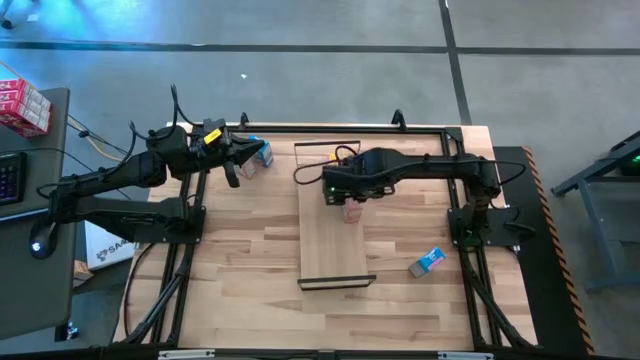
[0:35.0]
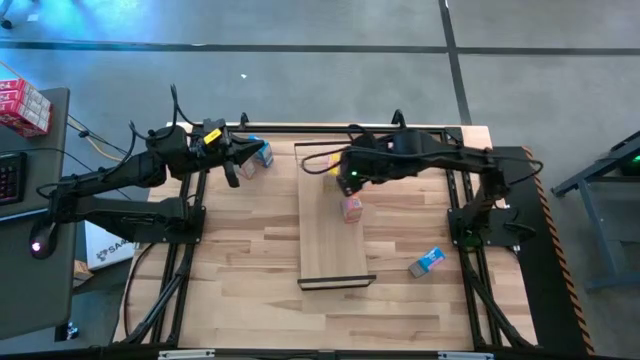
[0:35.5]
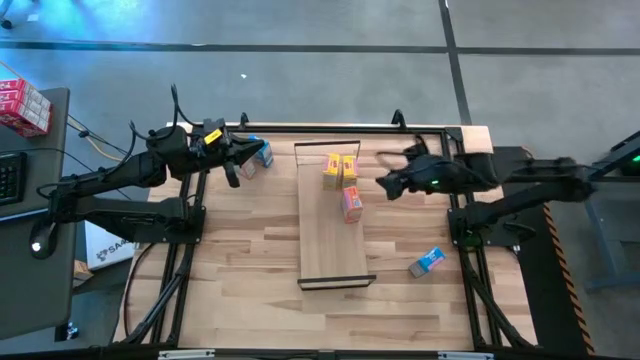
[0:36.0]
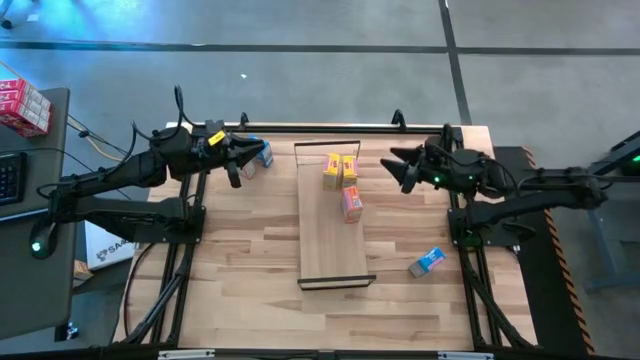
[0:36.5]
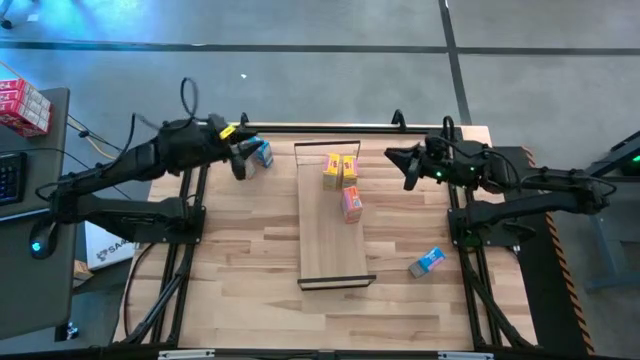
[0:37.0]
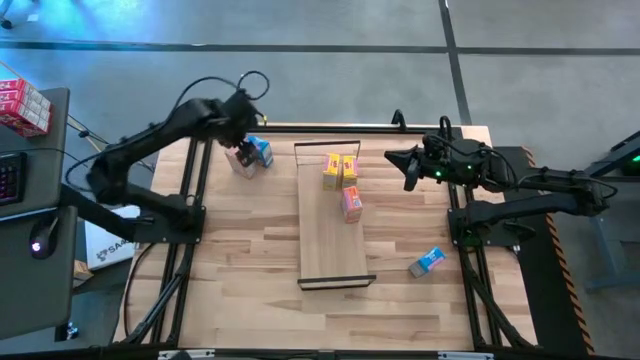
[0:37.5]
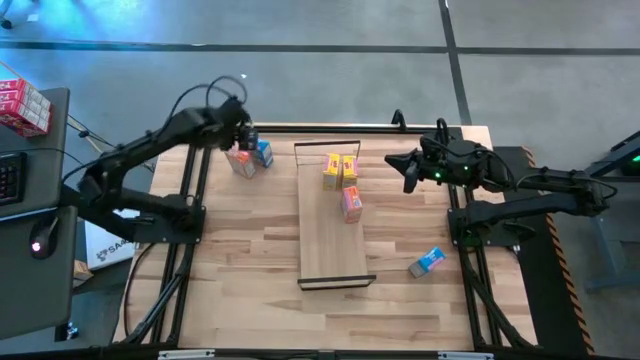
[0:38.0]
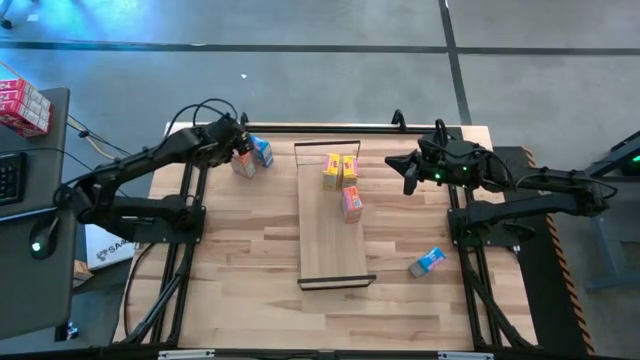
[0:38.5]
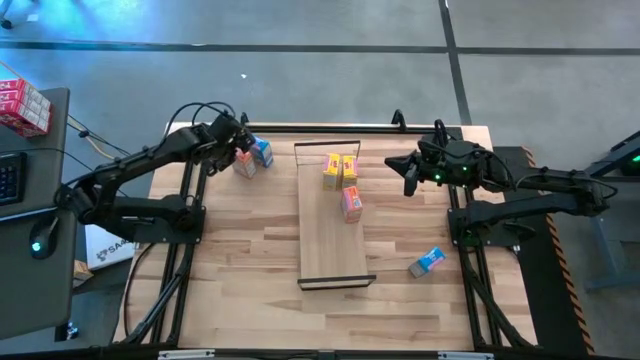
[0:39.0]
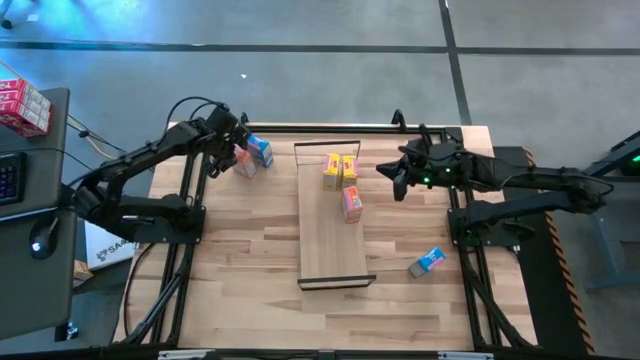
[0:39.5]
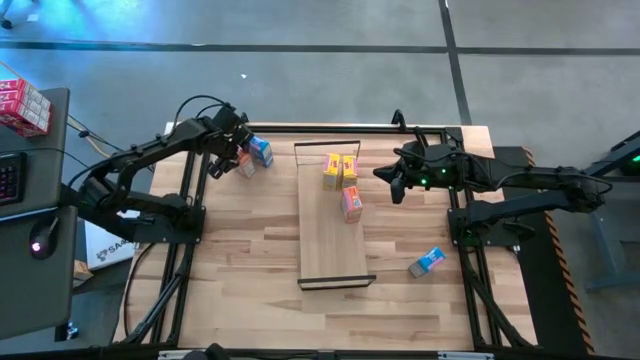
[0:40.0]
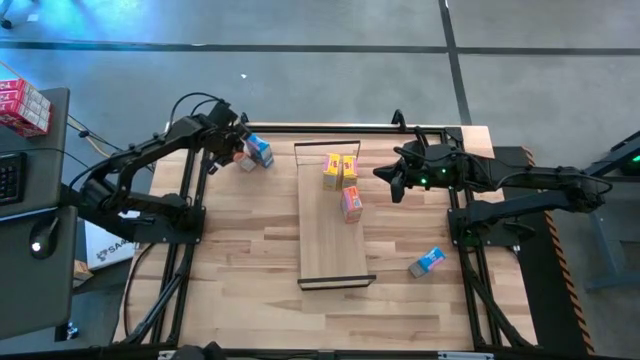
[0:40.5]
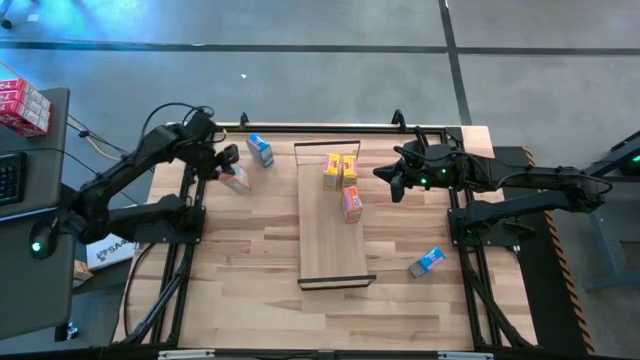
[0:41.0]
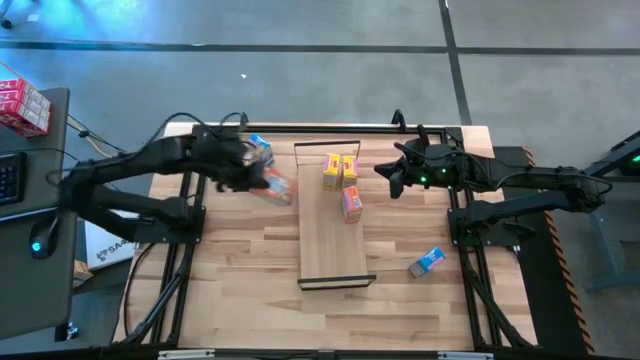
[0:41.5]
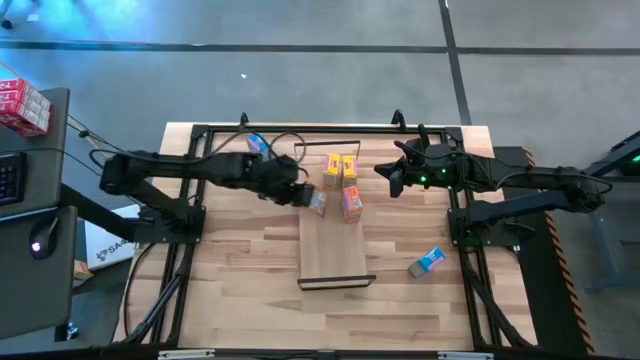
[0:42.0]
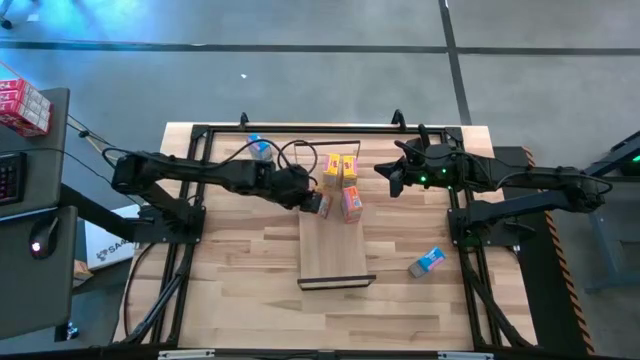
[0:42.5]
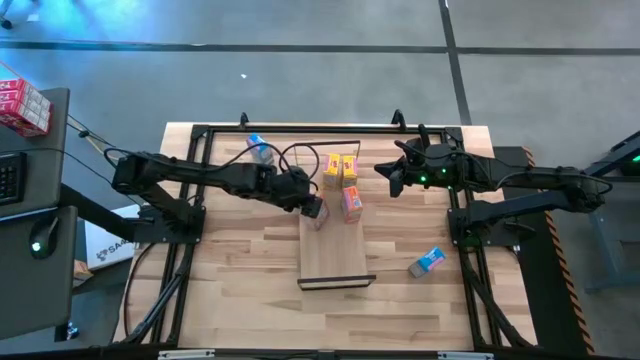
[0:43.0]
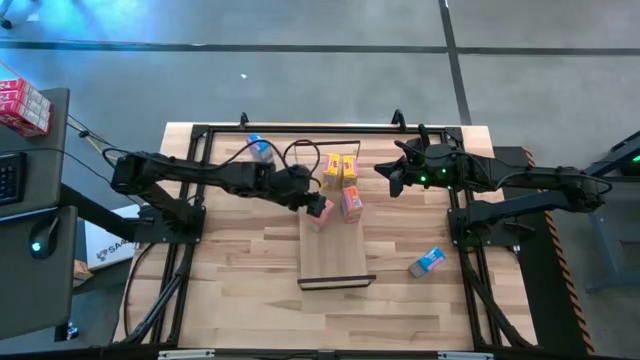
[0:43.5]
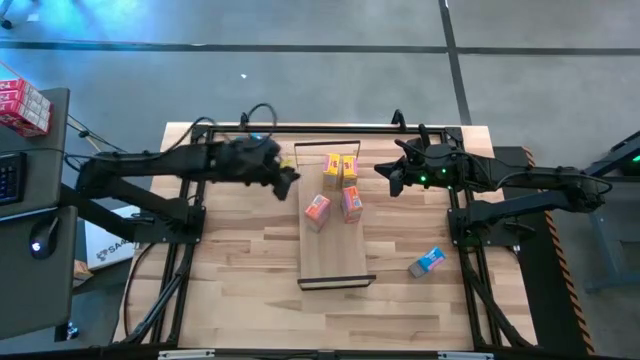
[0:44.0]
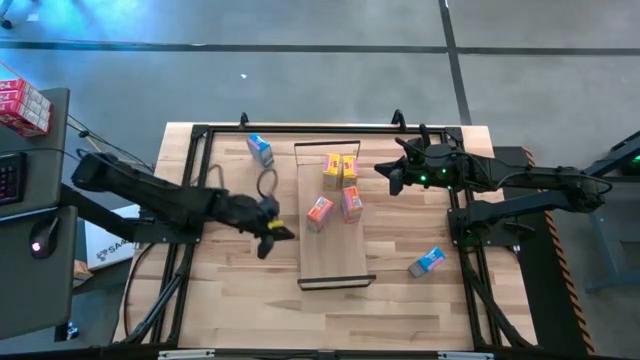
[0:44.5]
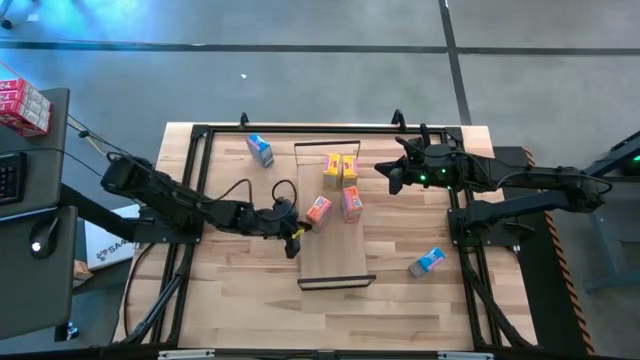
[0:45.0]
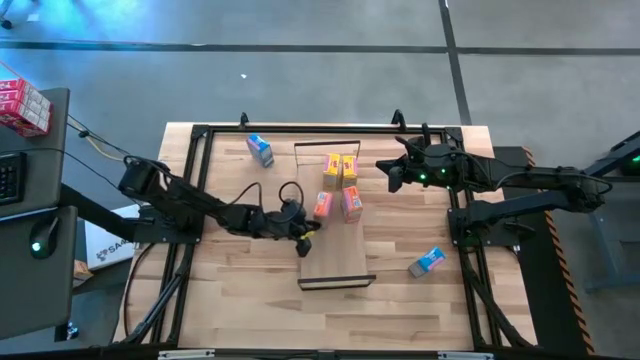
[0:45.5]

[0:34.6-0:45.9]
Task: Stack cereal on shelf
Stack the orange cereal box on the shelf aligned with the other orange cereal box

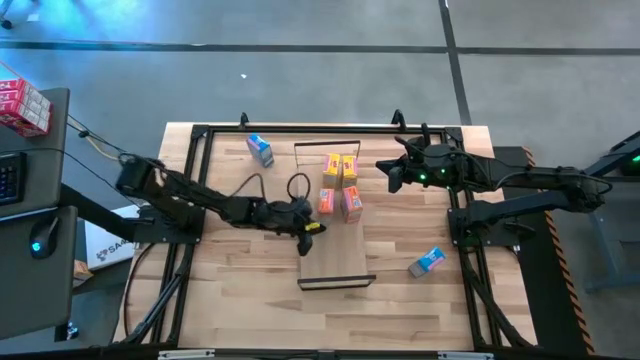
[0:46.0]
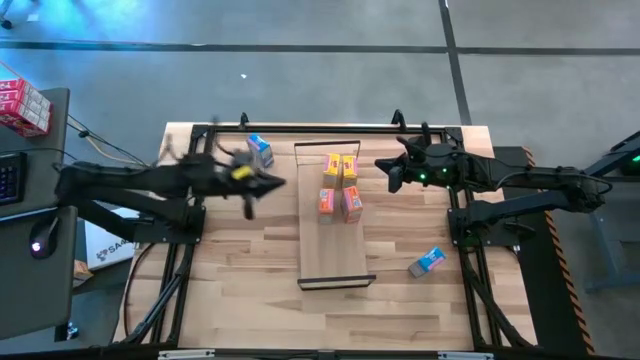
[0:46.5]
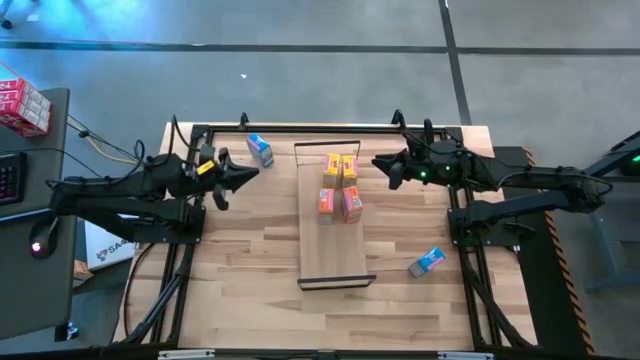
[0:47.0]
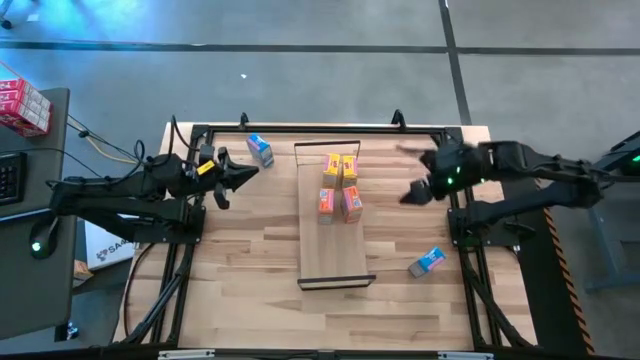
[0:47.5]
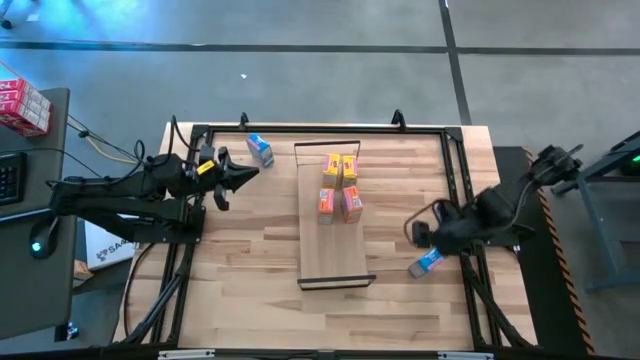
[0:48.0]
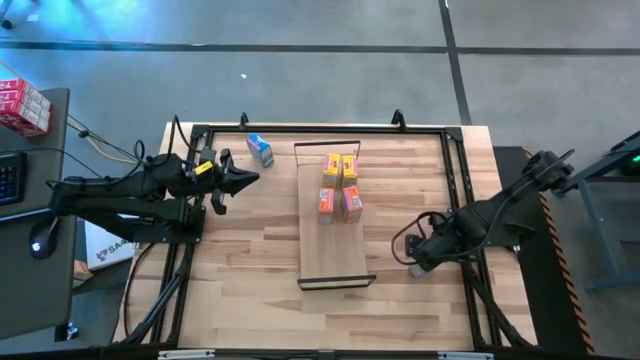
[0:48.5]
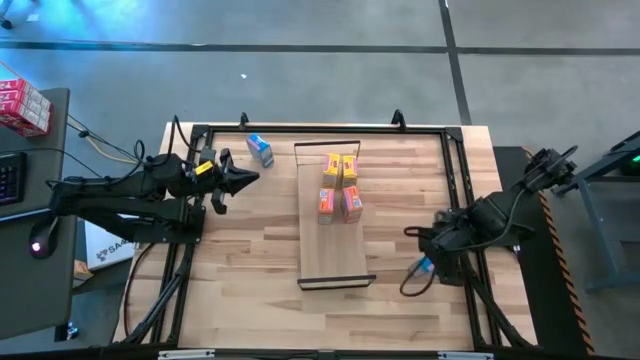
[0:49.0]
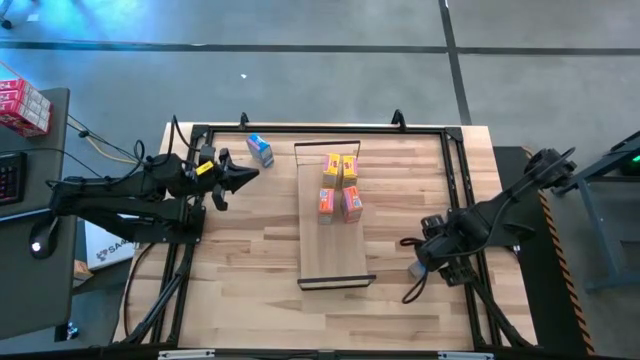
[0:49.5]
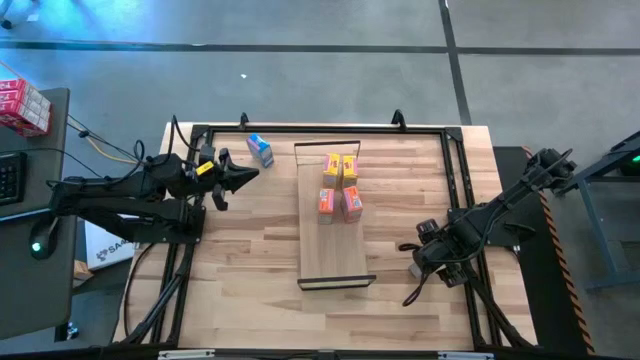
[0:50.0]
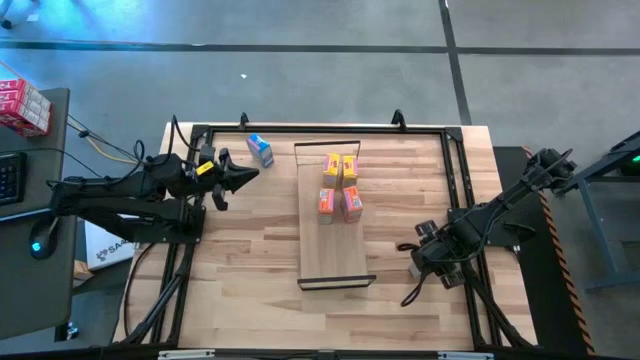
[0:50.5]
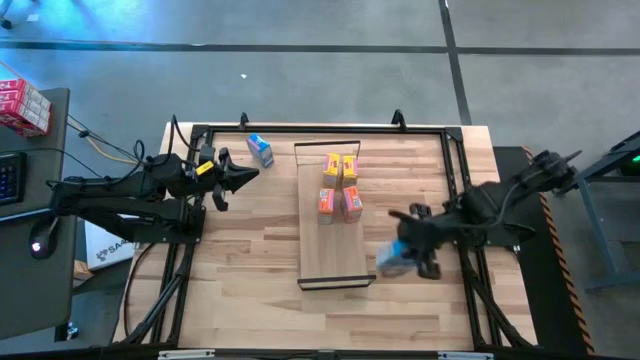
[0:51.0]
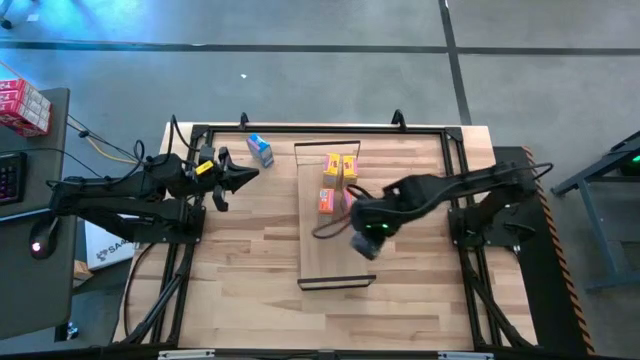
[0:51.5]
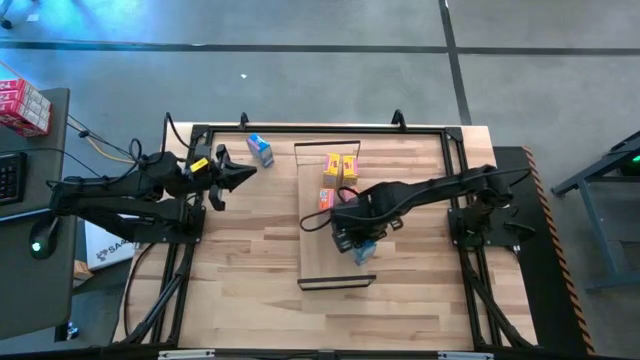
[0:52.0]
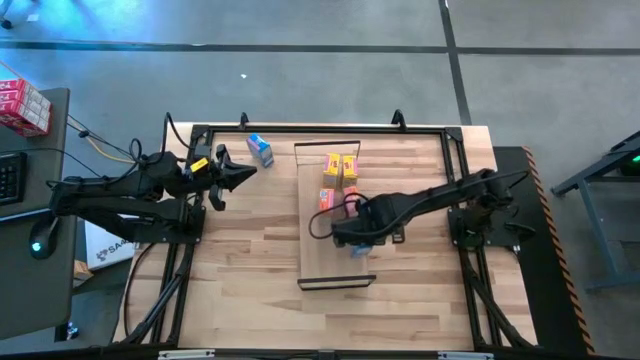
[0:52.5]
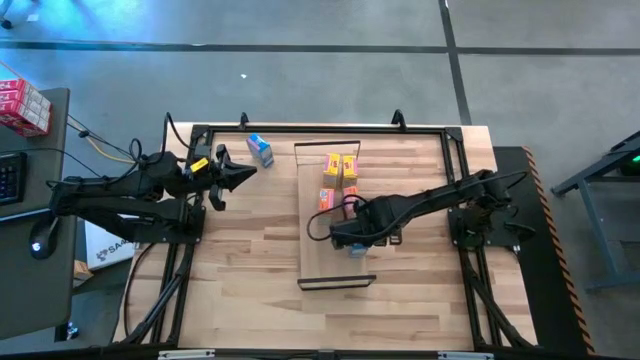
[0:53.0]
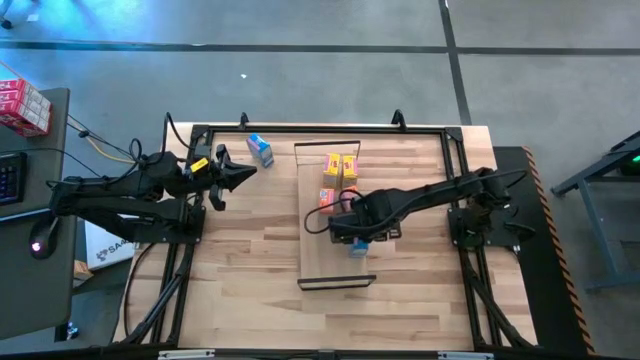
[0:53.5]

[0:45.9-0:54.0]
Stack the right blue cereal box on the shelf

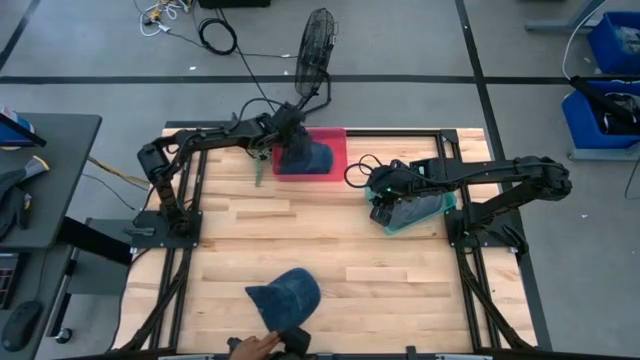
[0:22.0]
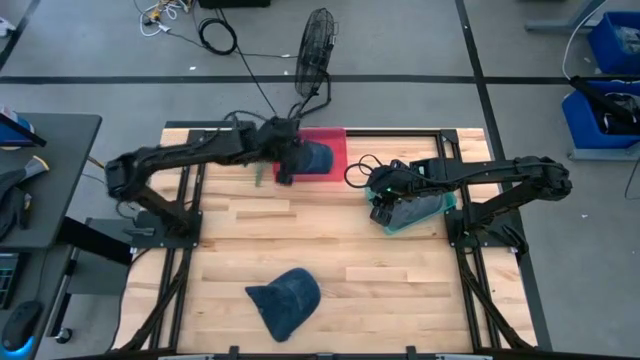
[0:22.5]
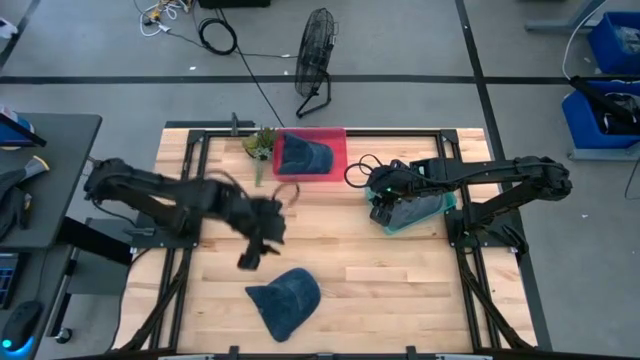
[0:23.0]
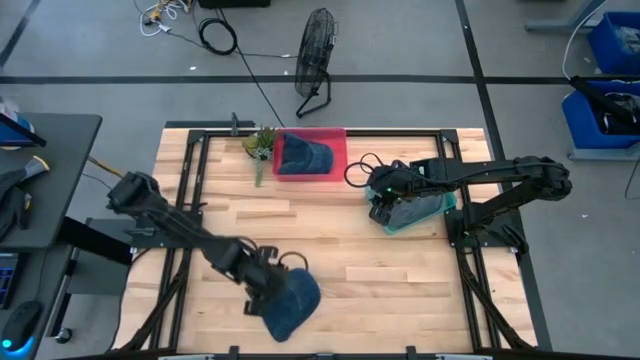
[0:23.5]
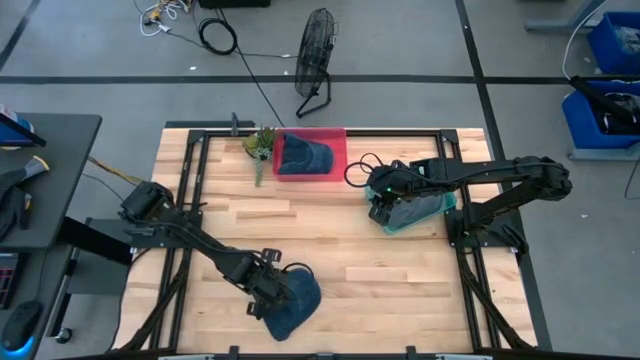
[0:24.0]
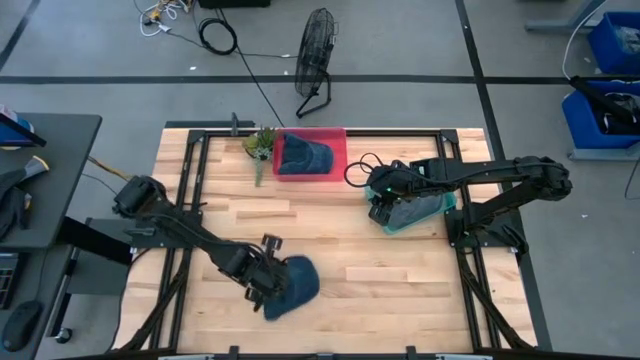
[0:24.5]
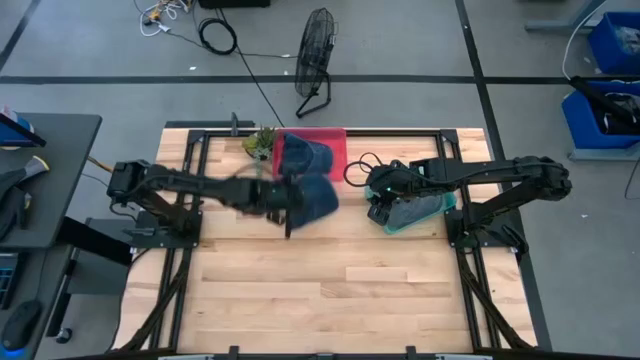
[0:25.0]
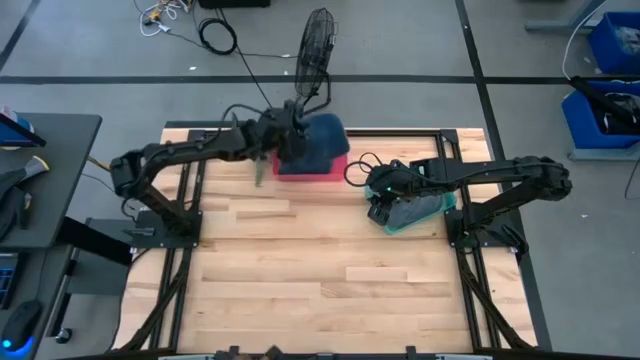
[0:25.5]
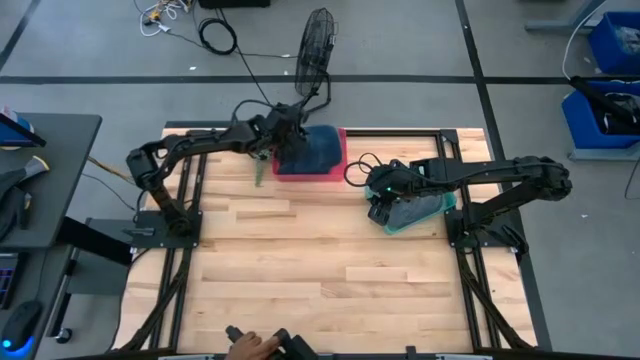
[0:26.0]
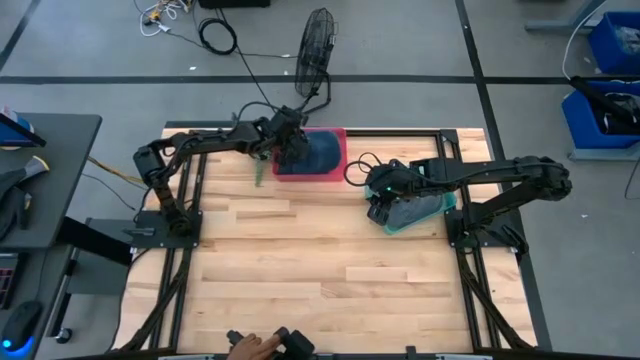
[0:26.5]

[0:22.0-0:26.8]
Task: Pick & Place hat
Put the blue cap into the red bin
